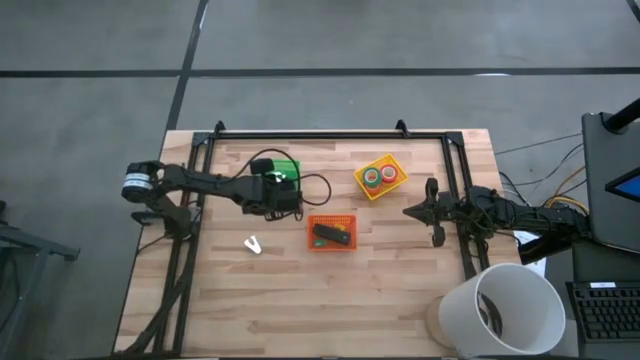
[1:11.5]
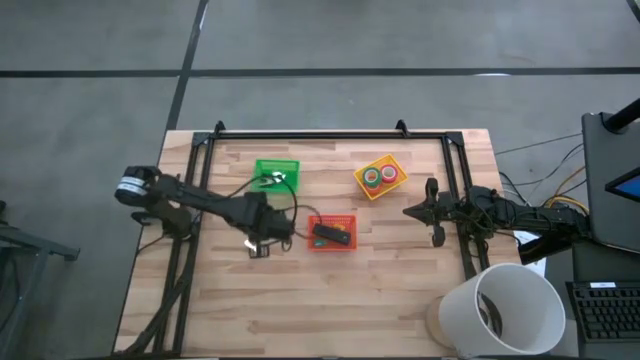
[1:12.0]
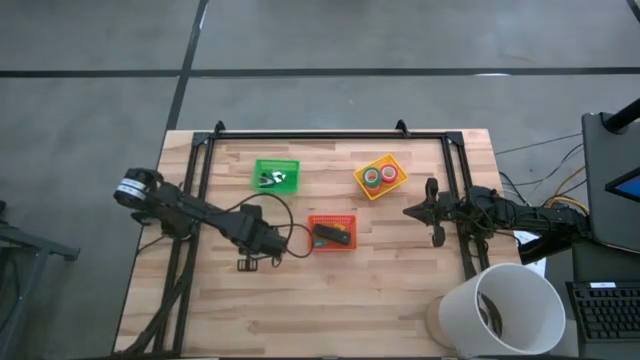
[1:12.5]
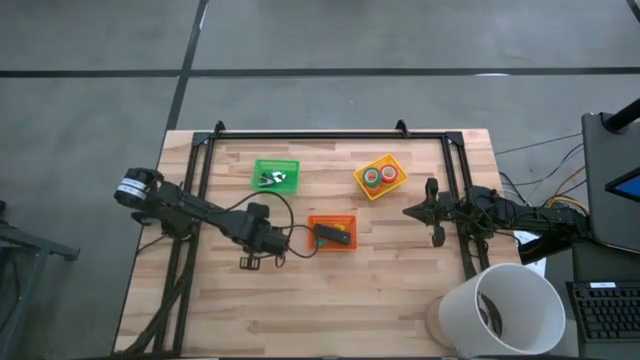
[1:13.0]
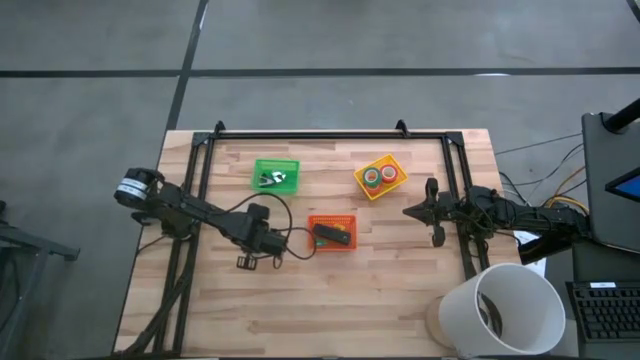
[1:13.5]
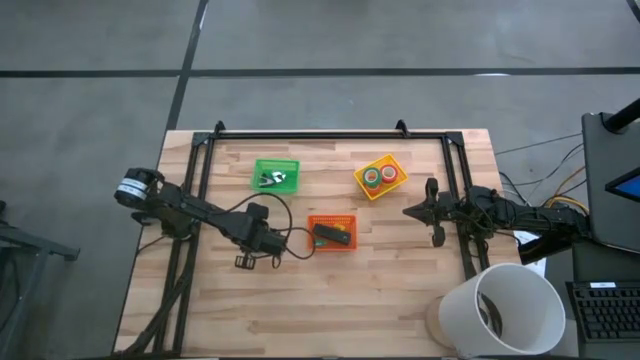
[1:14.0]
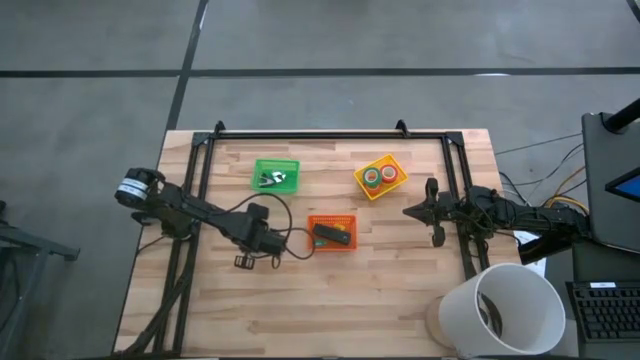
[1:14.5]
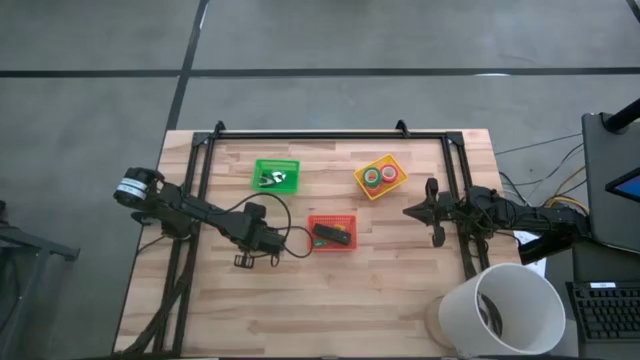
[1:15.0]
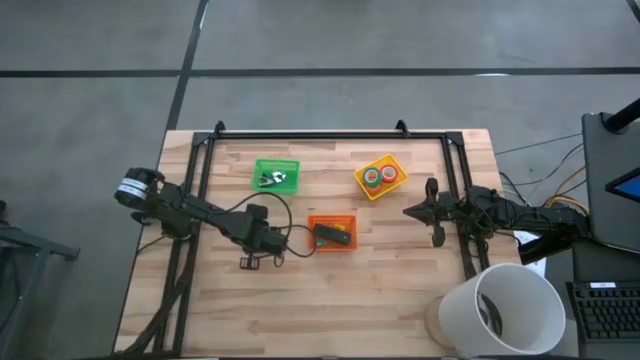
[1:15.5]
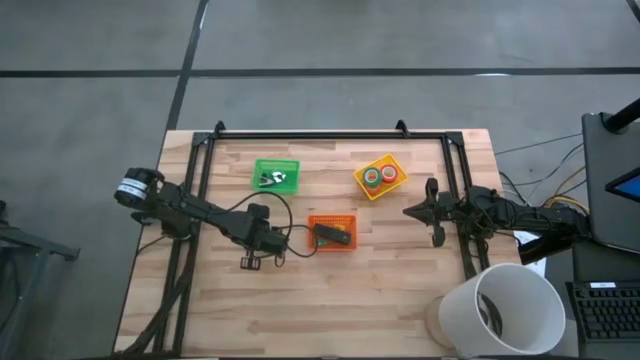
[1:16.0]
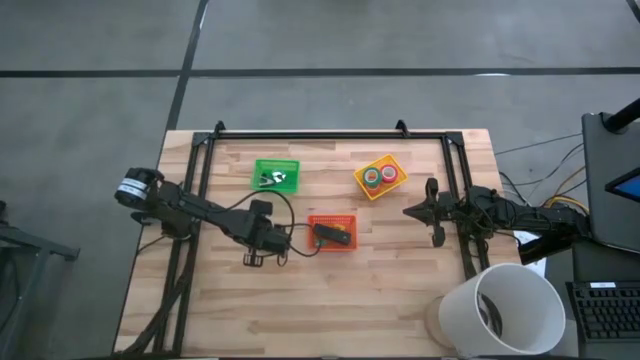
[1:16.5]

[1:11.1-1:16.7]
Task: Pick and place Stapler, Stapler remover, tape
Put the blue staple remover into the green bin

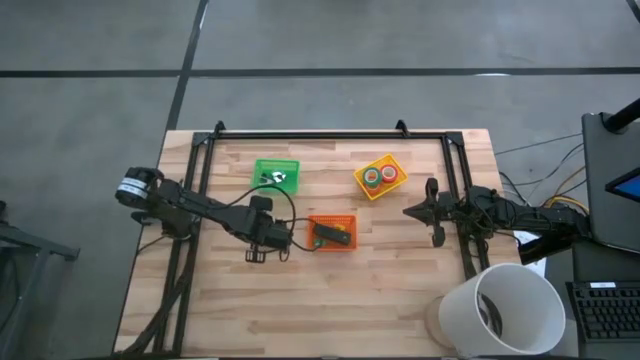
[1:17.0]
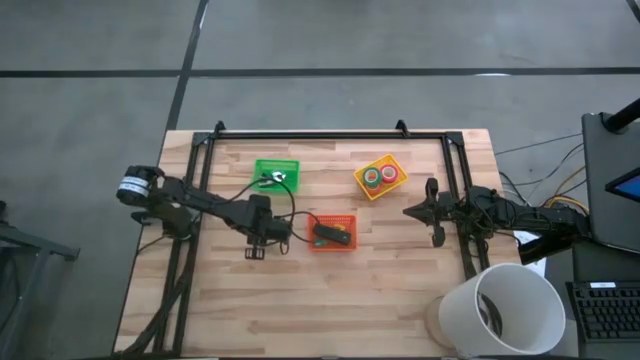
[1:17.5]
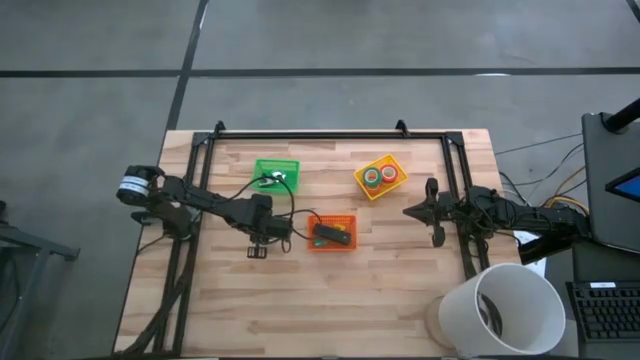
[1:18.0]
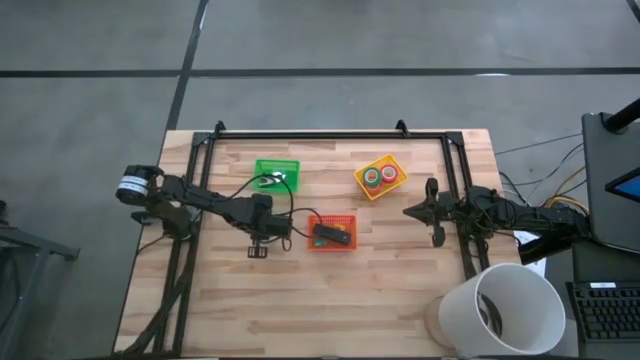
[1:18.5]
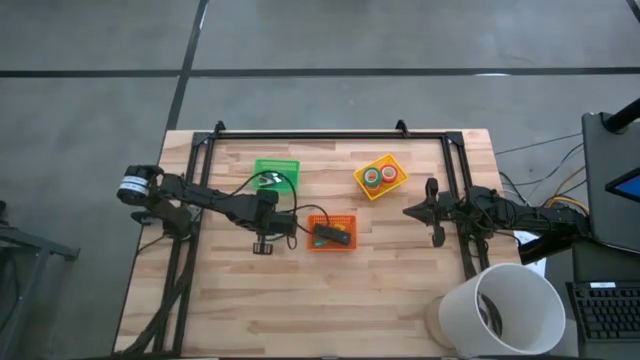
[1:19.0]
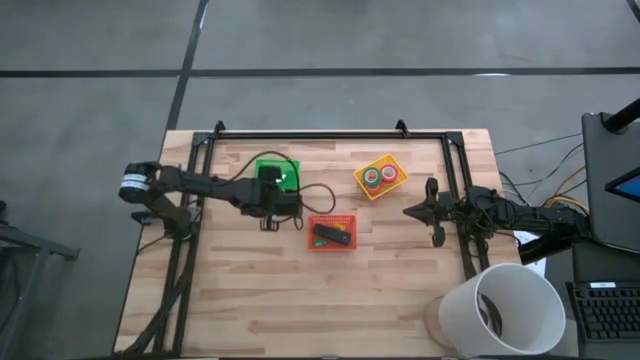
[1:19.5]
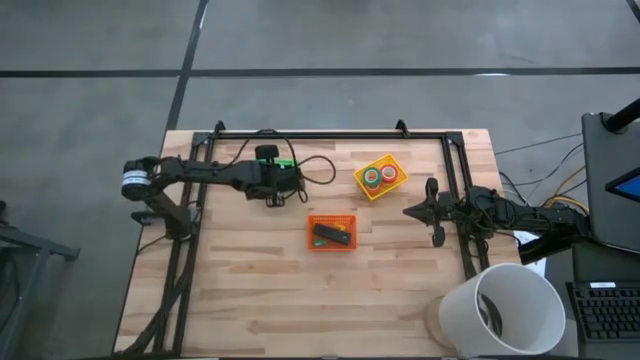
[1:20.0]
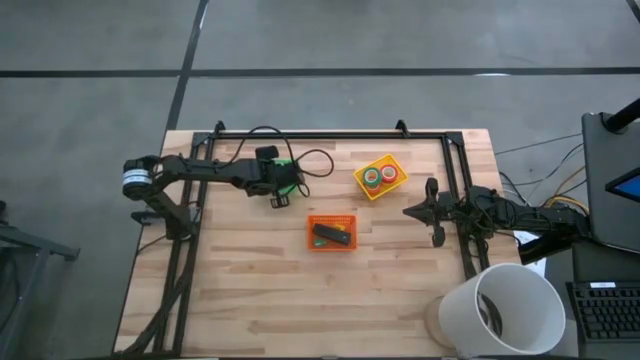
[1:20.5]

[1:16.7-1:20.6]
Put the blue staple remover into the green bin

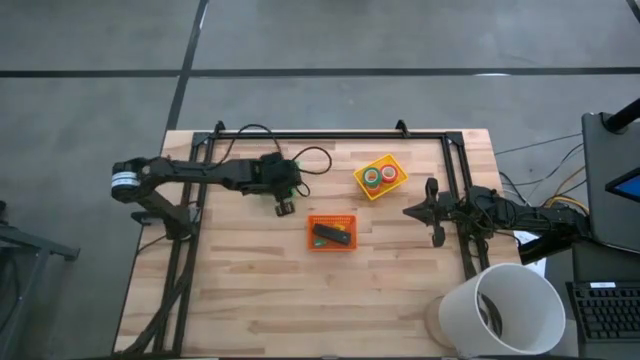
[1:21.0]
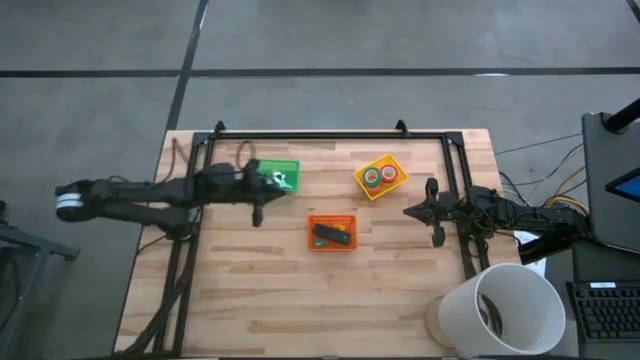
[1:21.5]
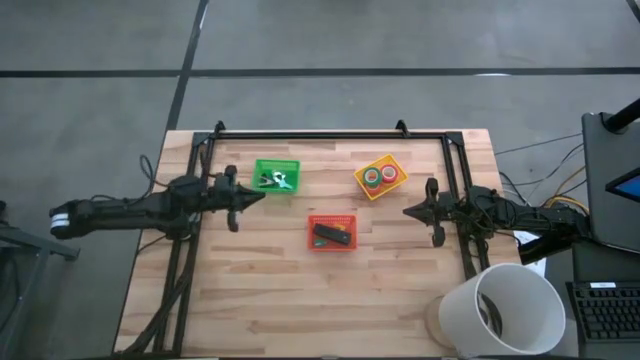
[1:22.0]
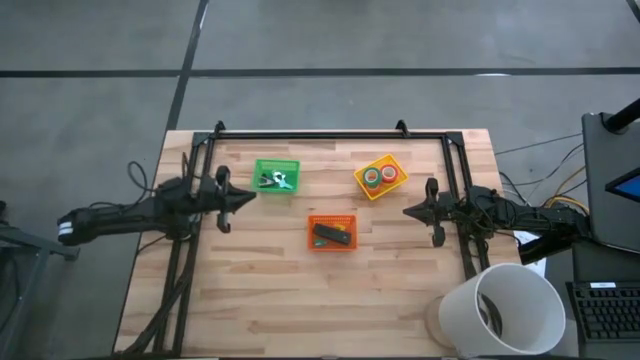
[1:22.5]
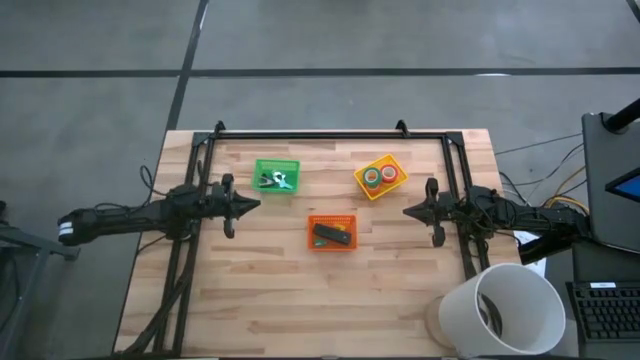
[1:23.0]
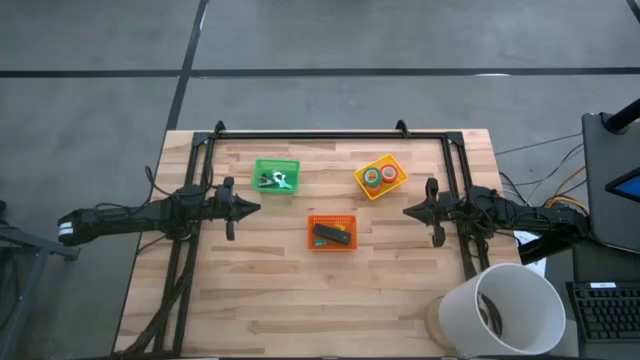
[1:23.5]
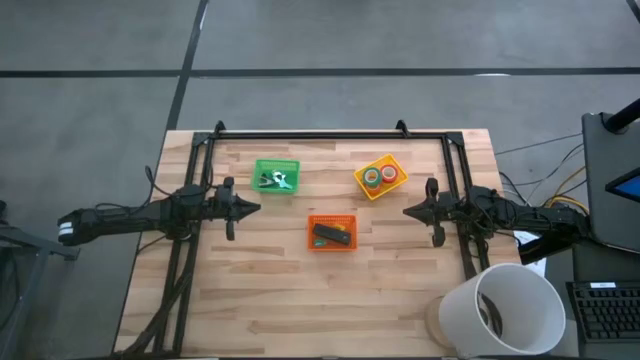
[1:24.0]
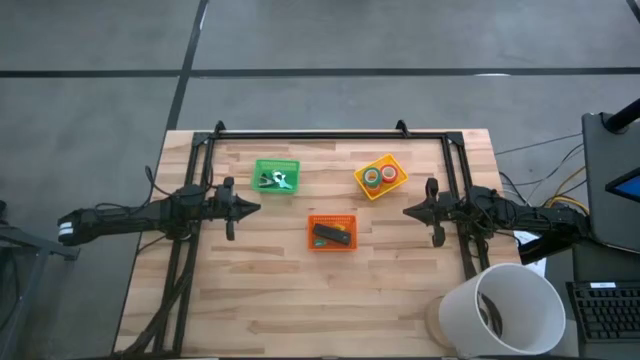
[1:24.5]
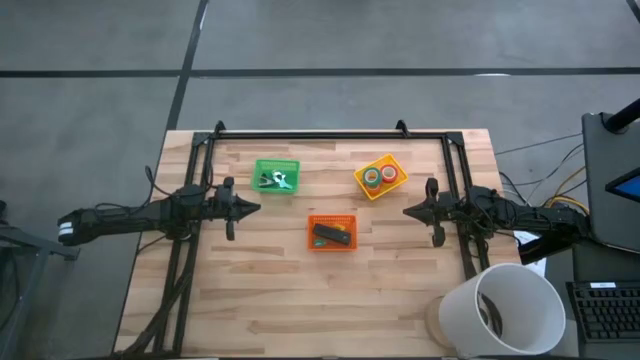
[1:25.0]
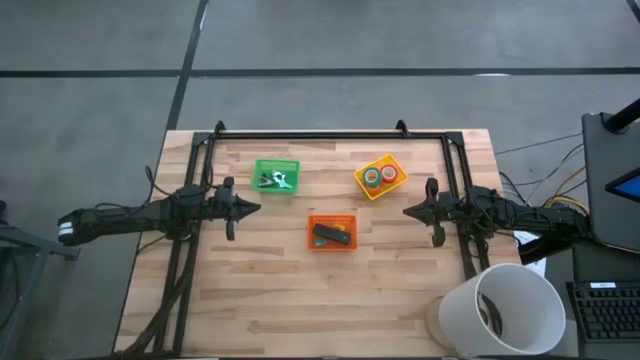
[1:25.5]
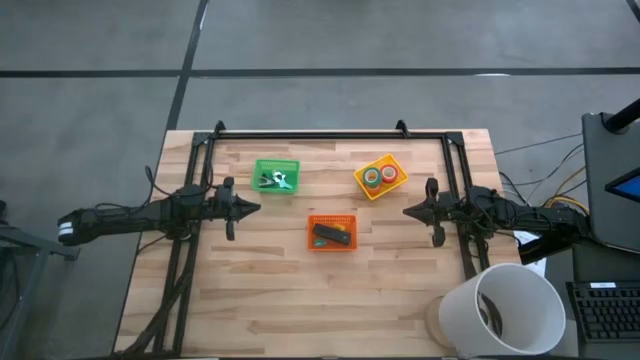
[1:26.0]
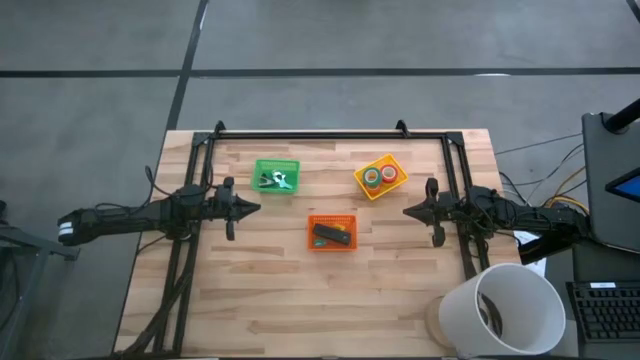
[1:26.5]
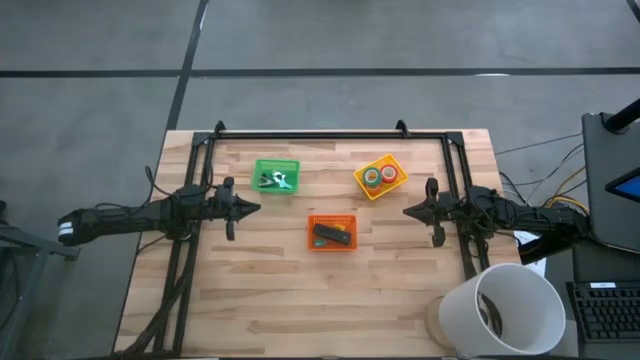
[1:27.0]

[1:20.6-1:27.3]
Return to Home Position

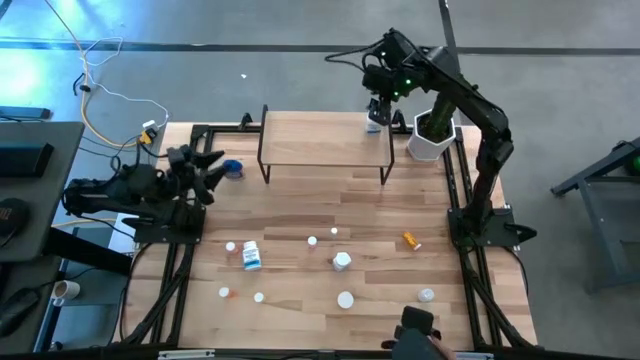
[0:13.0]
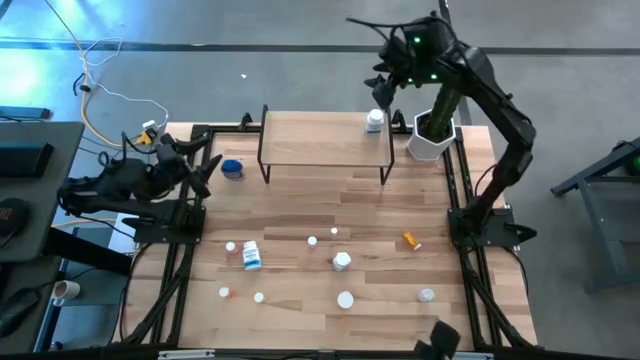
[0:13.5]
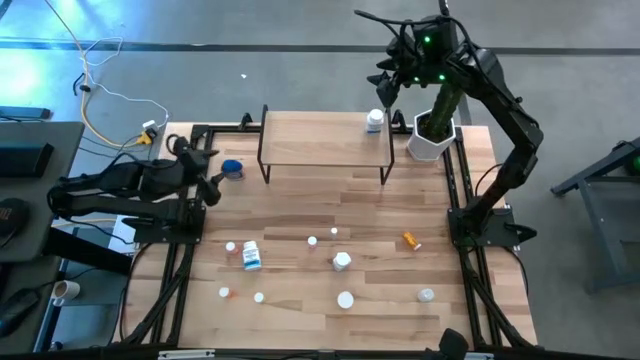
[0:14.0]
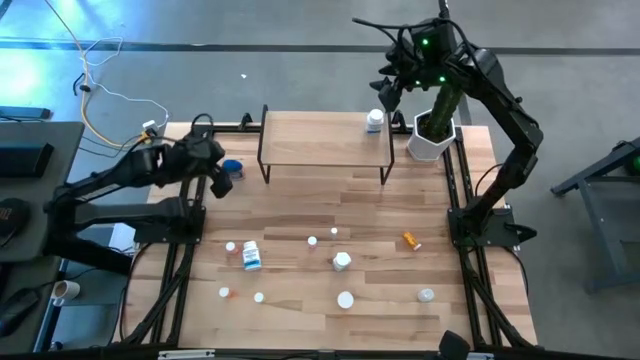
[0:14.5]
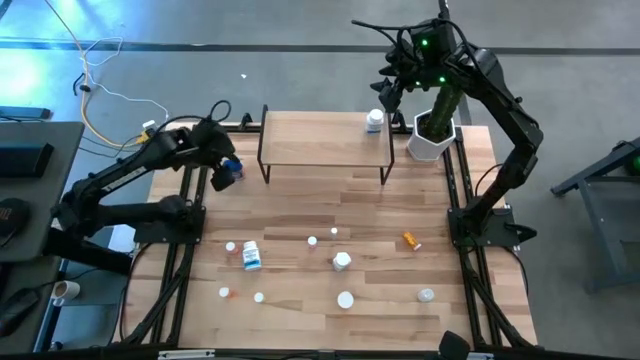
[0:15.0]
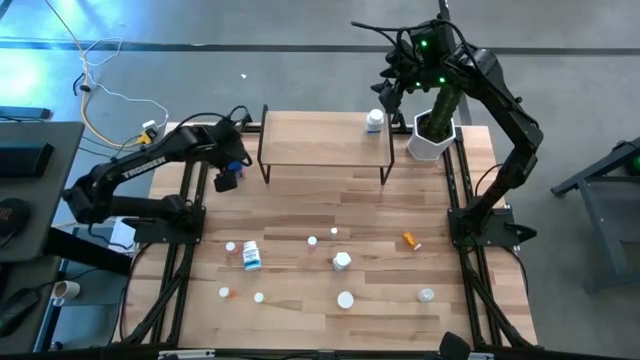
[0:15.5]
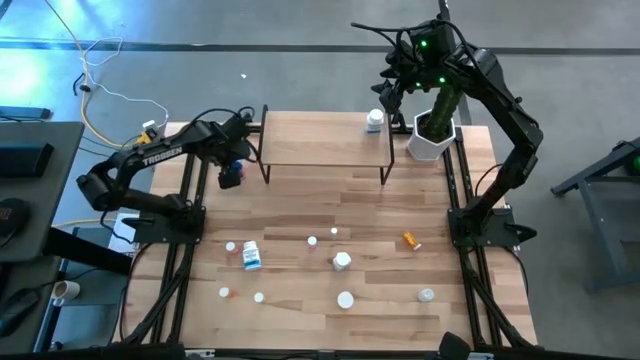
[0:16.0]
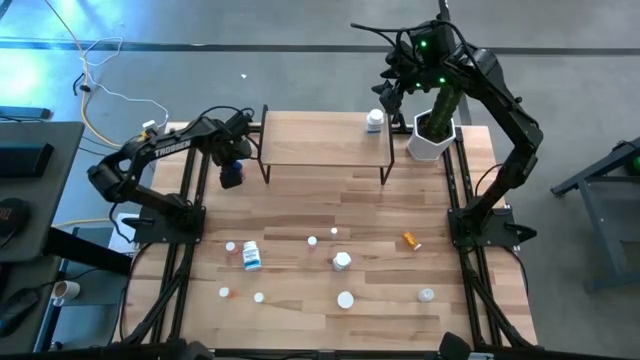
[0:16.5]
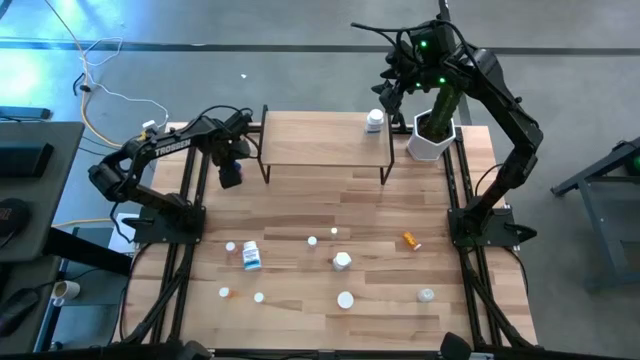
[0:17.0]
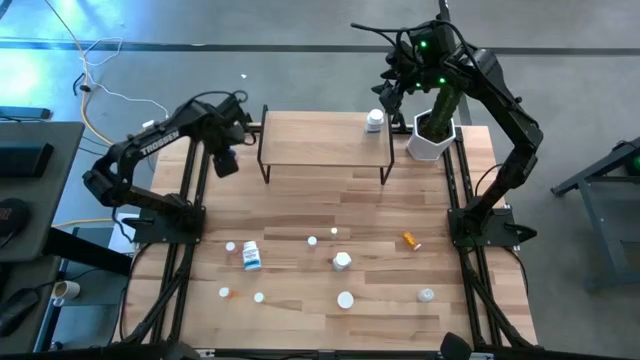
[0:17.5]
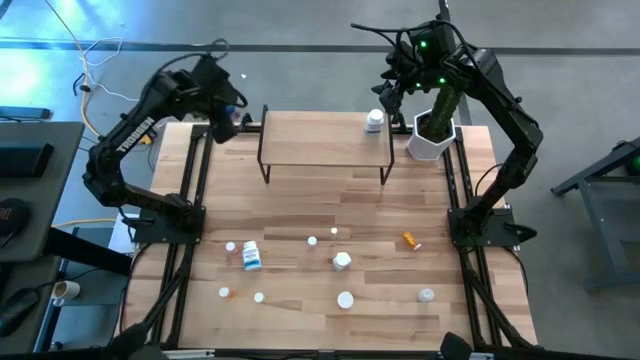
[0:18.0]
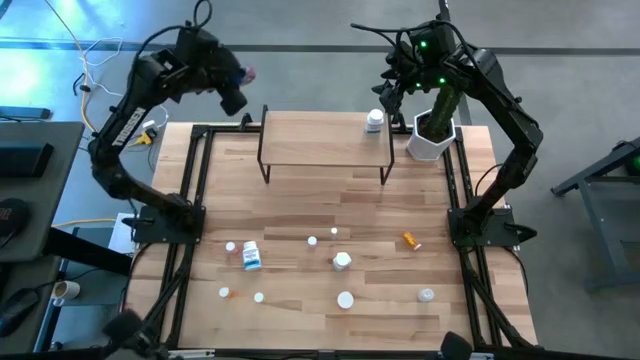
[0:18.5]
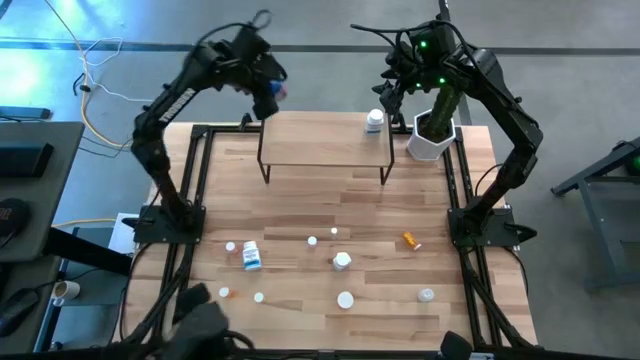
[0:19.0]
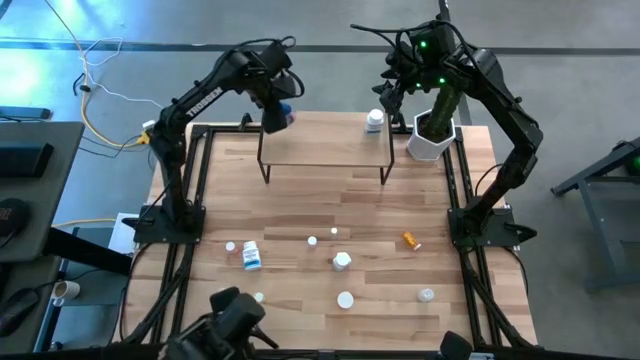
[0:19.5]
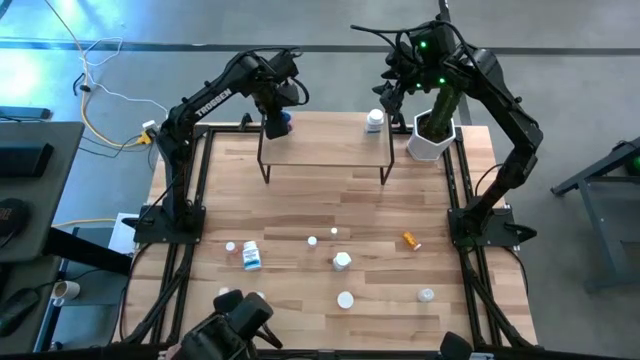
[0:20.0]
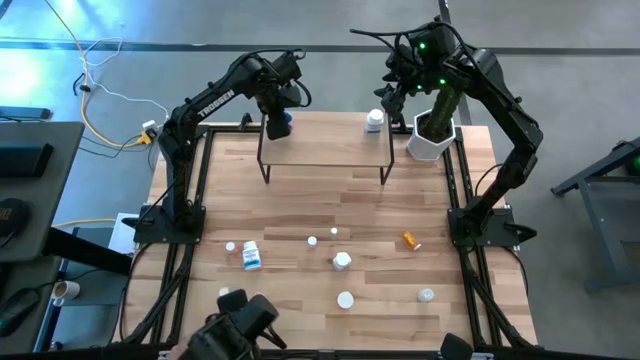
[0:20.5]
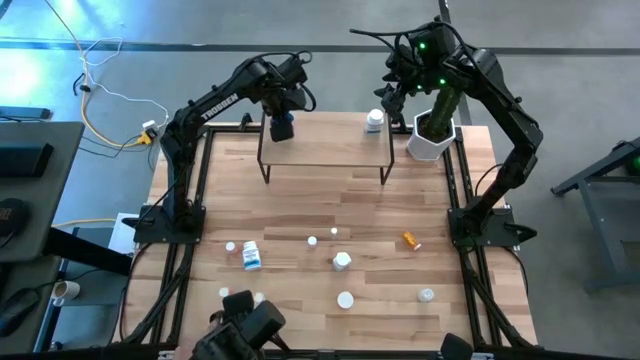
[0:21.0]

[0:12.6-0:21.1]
Task: Pick and place medicine bottles onto shelf by color
Put the blue pill bottle on the shelf
